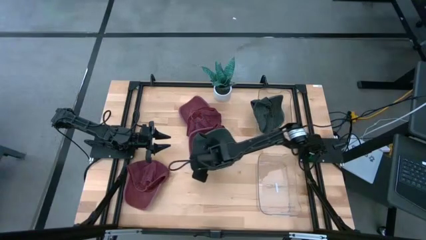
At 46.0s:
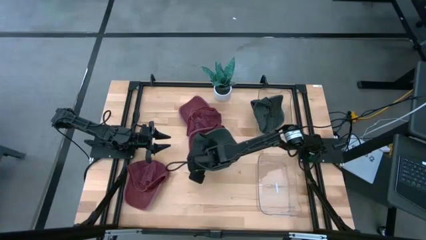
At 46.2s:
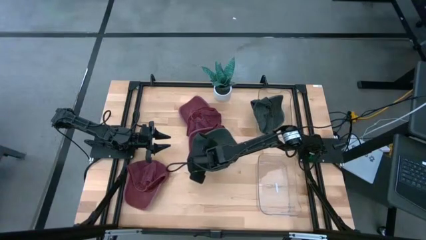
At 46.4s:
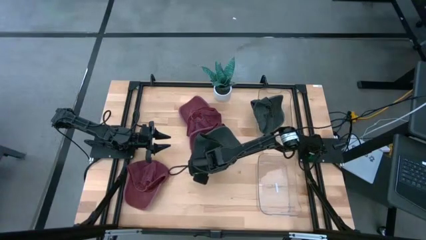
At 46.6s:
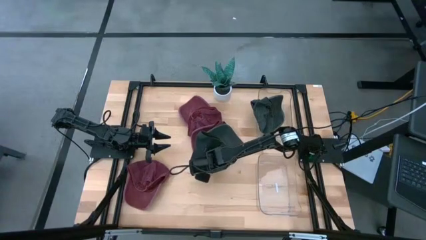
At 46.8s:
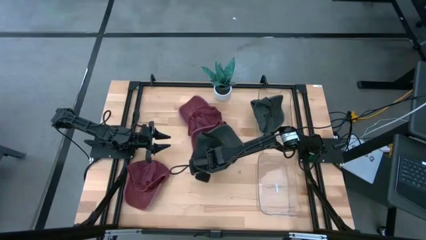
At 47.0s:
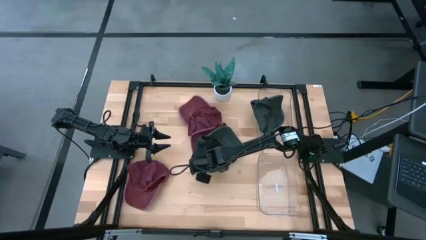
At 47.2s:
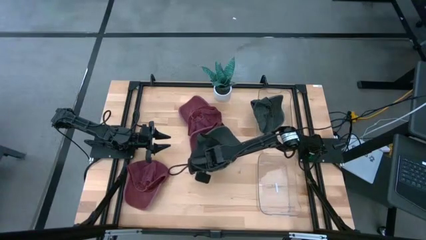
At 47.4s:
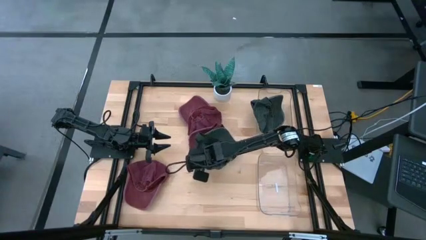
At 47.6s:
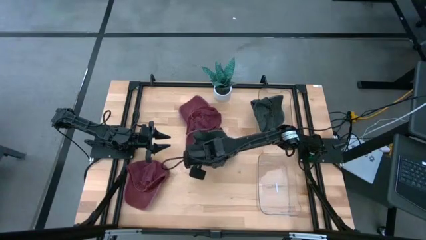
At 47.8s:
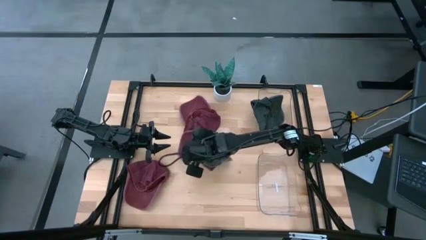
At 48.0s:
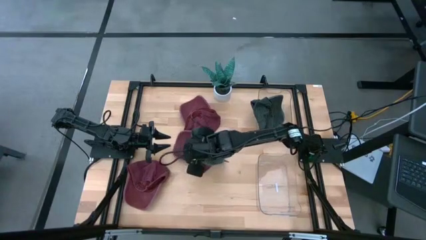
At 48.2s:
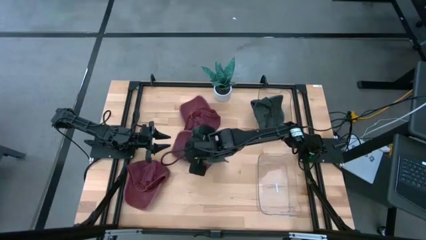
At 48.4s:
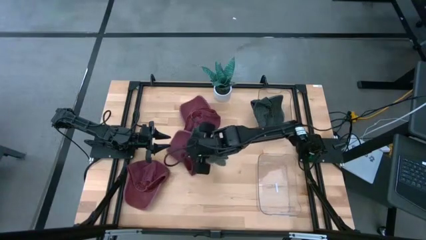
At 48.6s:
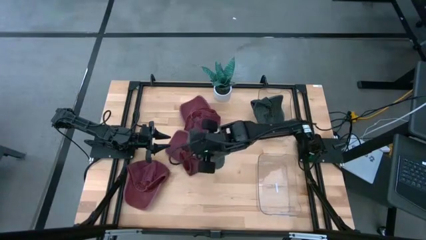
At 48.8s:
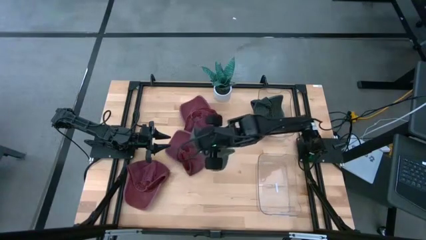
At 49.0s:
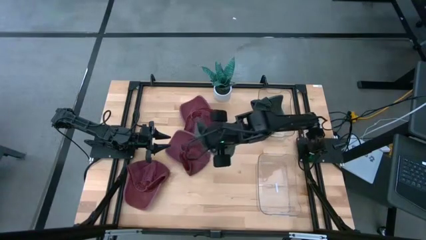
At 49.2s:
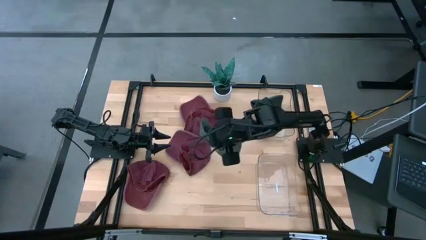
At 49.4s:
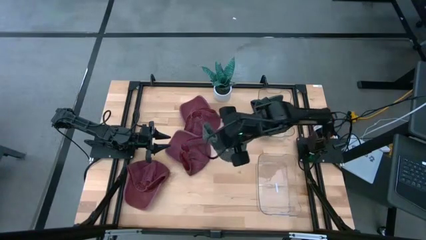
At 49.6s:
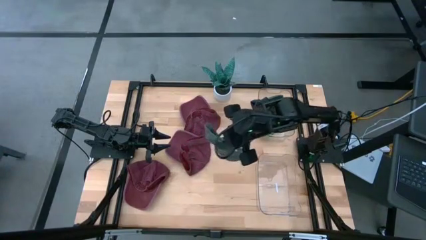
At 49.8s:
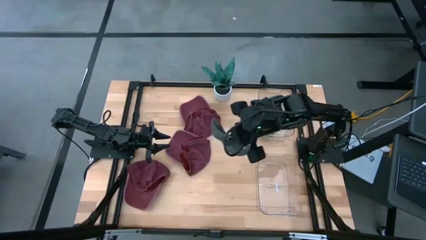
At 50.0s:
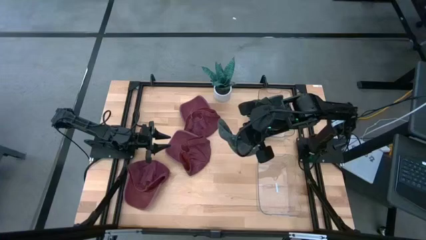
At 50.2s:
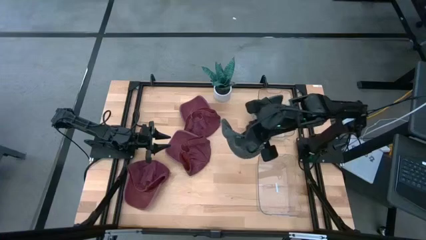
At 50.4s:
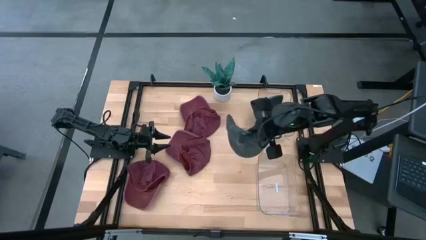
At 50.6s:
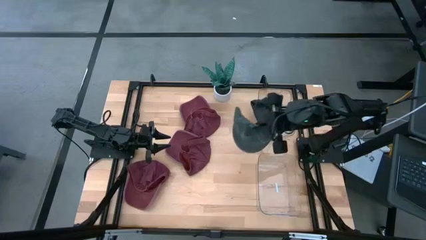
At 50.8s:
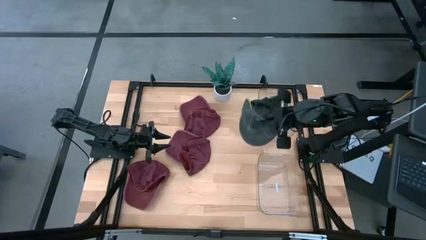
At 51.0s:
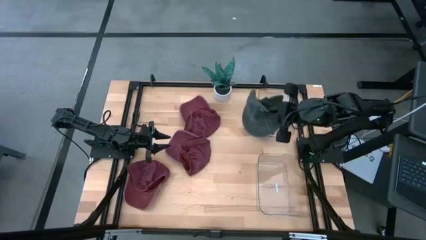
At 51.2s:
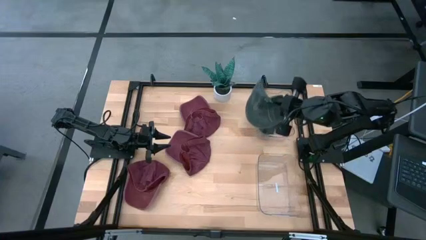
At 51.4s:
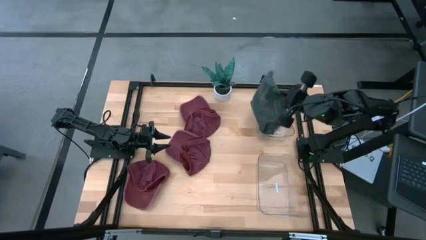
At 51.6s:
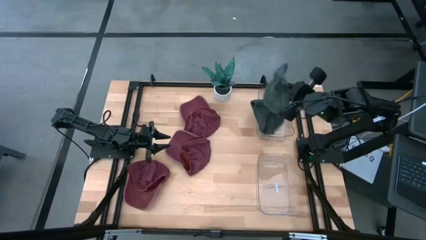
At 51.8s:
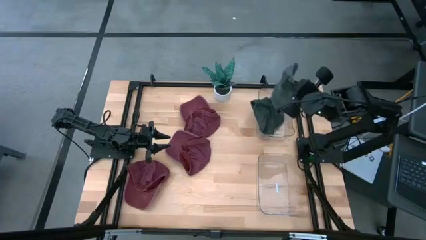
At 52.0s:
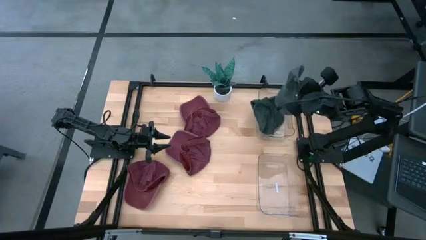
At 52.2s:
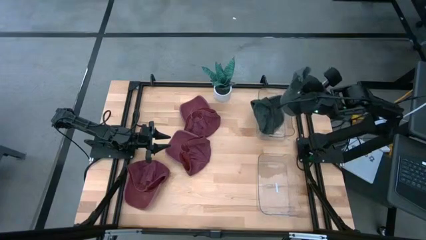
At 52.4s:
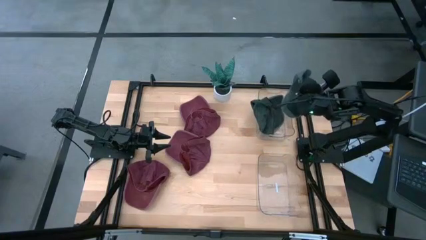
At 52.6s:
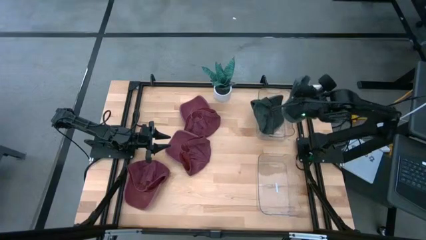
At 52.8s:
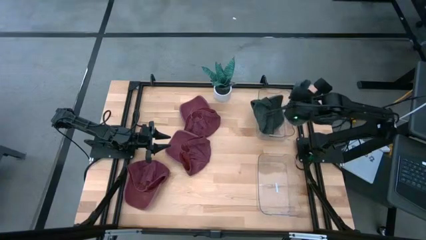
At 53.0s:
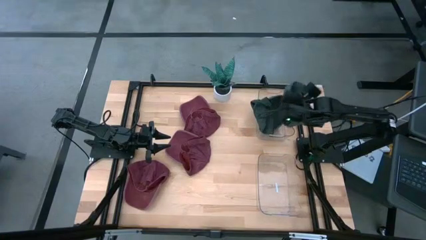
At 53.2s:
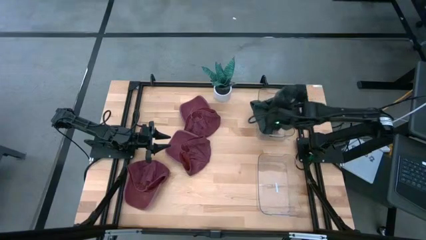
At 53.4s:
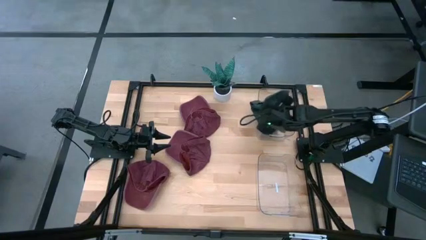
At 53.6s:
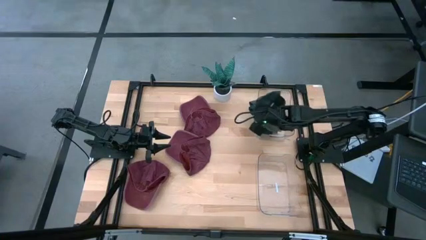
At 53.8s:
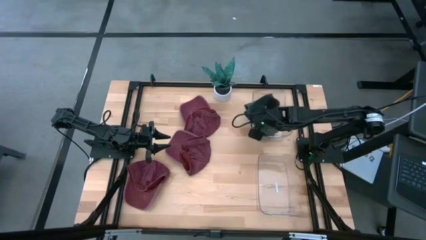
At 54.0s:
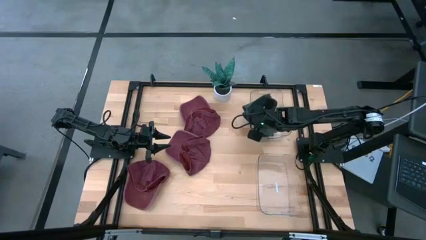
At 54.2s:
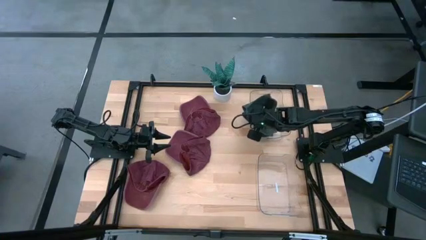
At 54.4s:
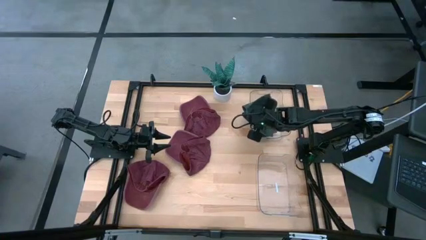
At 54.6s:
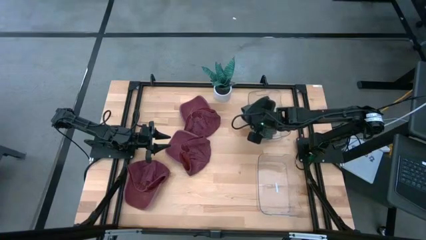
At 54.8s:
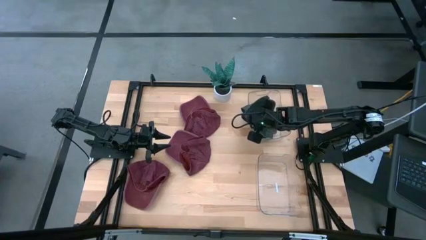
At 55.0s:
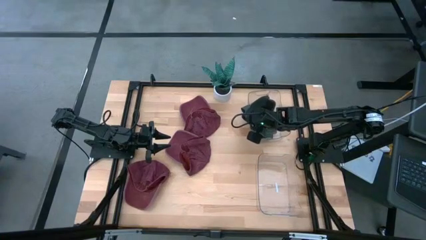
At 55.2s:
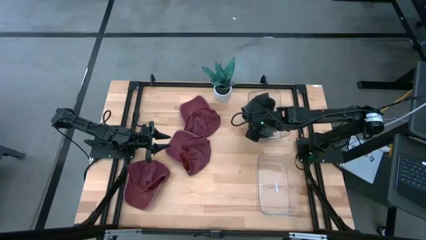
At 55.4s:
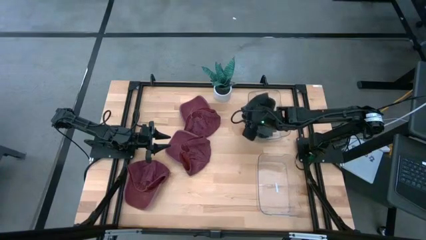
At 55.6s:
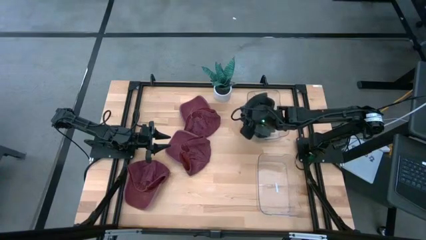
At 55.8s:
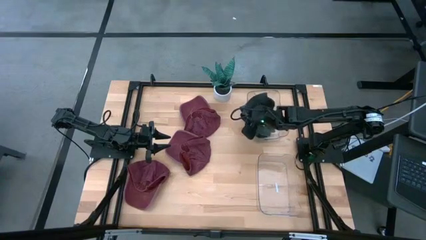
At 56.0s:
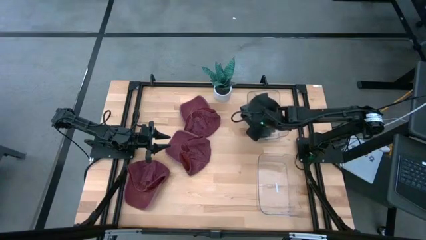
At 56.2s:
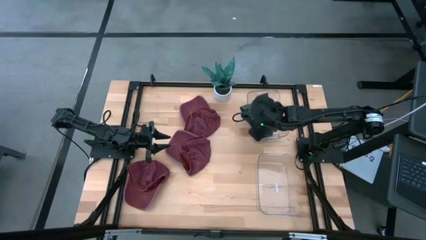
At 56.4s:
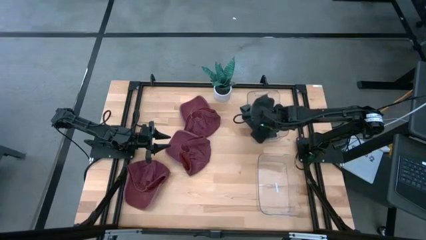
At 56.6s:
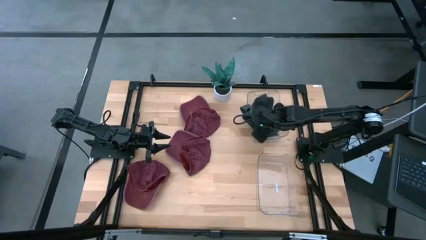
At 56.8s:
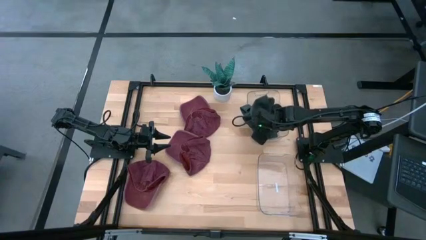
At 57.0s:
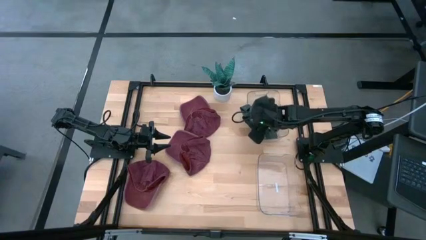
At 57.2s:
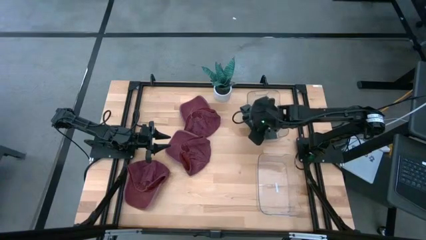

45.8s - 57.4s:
Task: Pick & Place hat
Put the black cap into the top transparent bin
